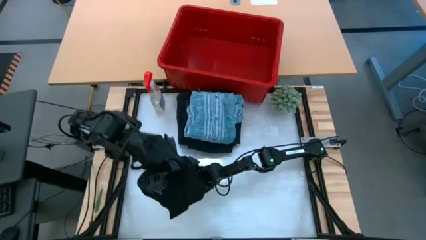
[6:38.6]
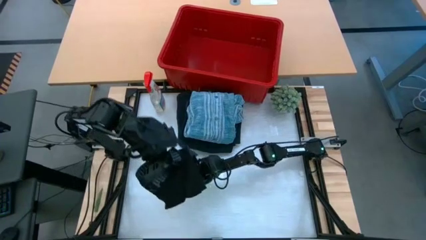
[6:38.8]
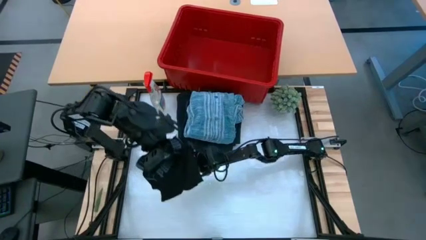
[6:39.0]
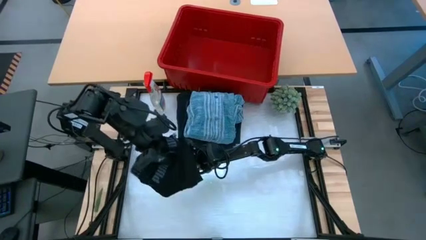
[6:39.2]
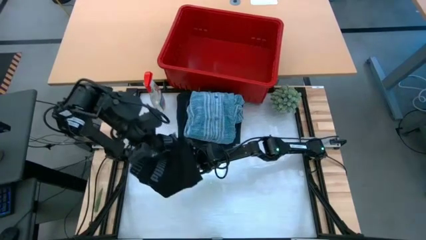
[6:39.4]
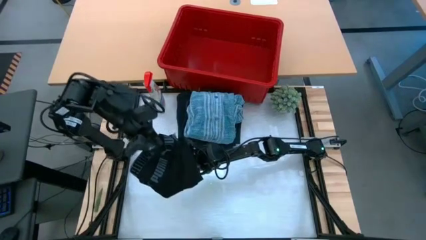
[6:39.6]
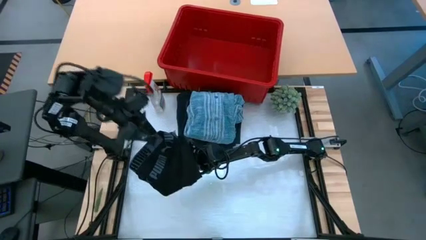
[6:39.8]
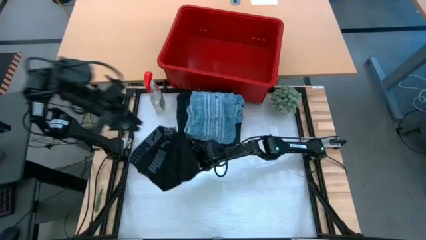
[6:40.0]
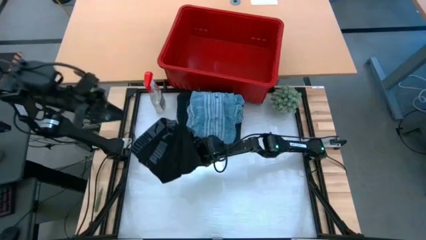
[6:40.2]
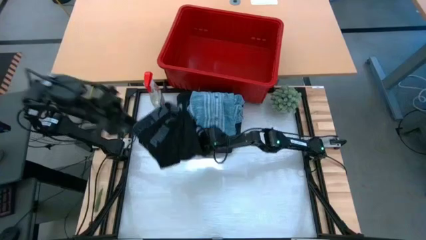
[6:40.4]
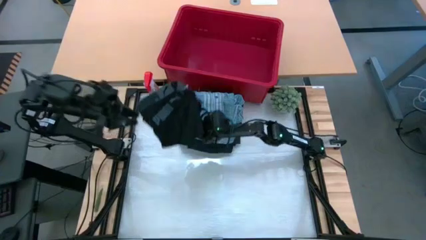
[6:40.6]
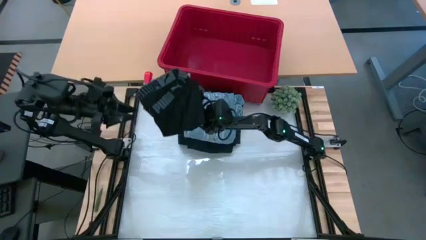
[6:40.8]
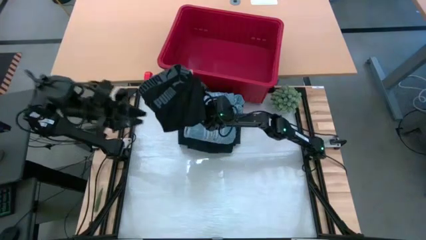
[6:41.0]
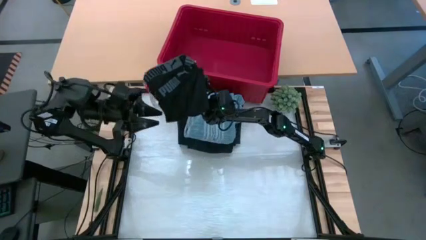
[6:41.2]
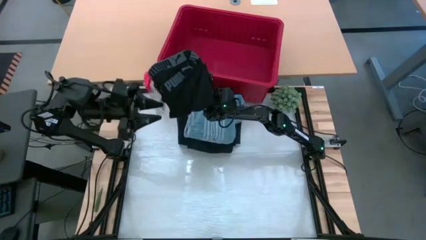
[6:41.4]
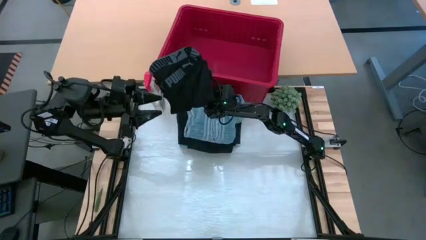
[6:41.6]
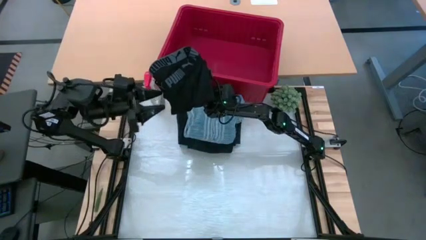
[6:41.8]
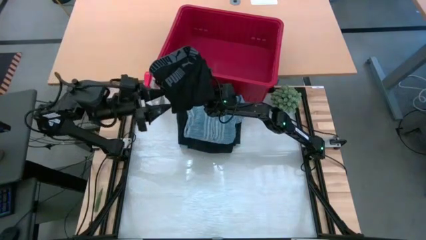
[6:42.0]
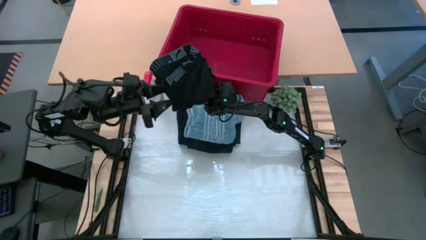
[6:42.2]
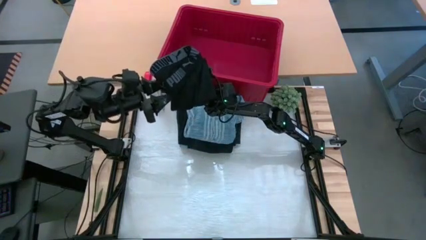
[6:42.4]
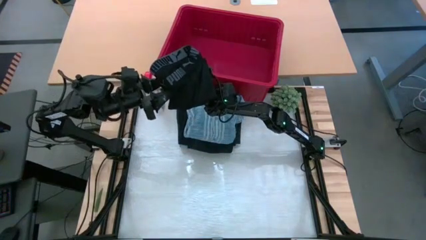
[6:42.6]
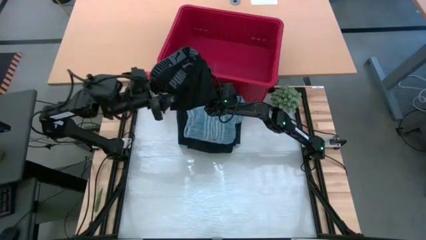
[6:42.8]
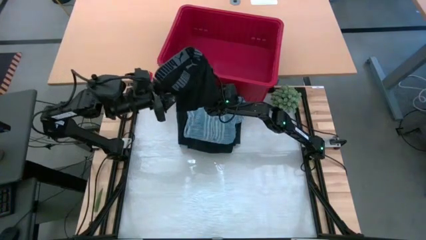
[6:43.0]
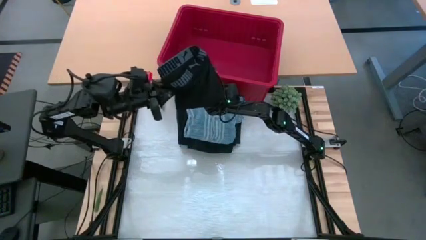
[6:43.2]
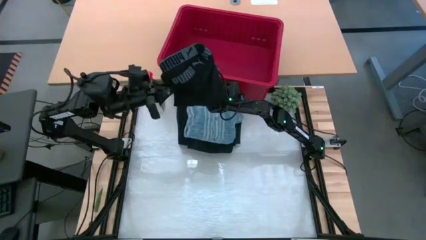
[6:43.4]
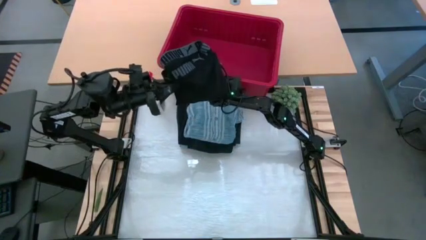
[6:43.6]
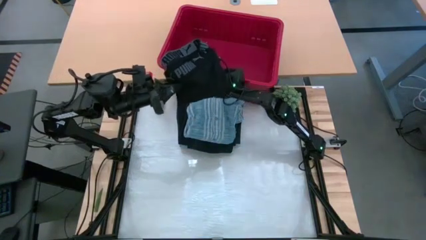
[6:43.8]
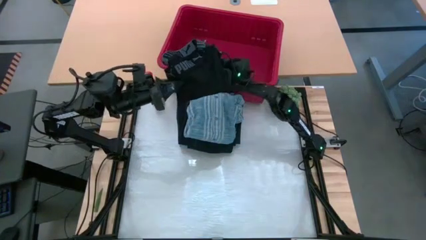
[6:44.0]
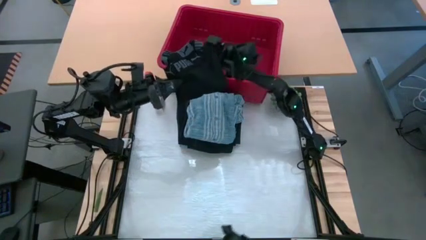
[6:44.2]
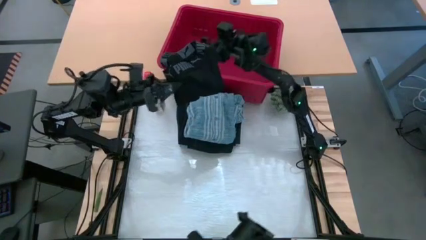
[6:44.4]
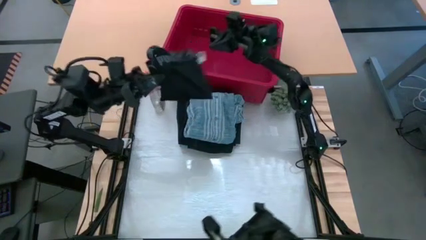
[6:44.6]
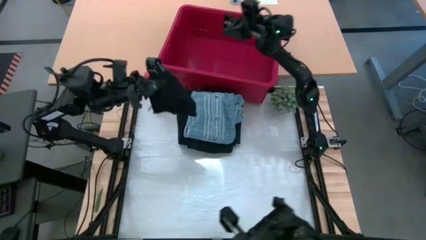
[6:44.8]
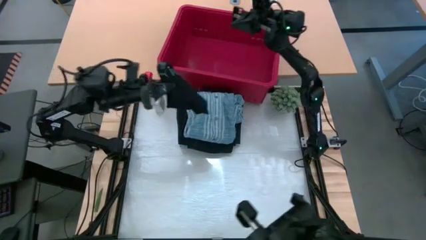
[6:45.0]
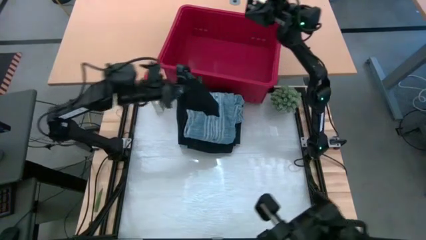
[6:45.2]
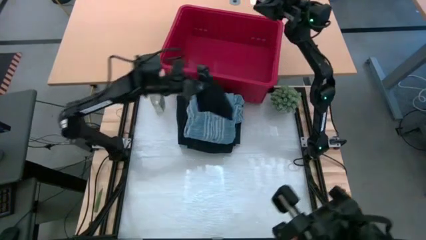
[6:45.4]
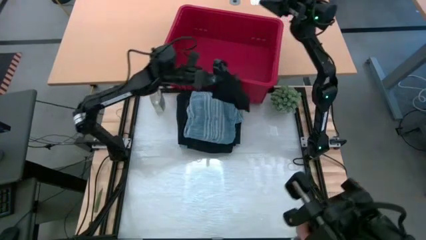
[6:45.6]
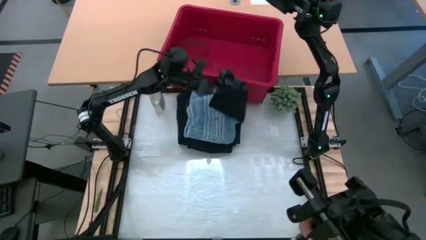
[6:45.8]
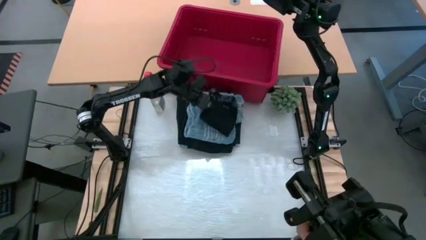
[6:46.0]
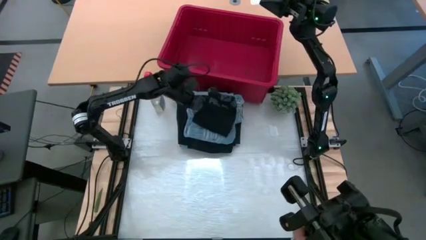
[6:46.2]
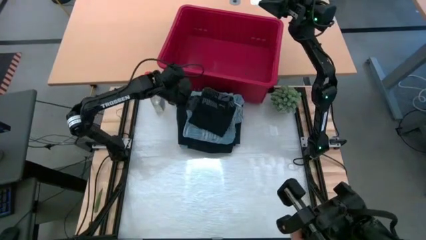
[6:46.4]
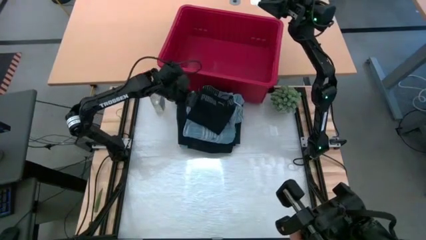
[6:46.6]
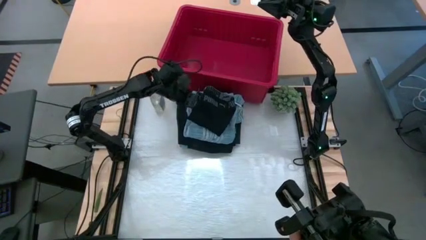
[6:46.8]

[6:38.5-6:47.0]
Task: Fold Laundry from Bin
Stack the black underwear on top of the blue long sleeve

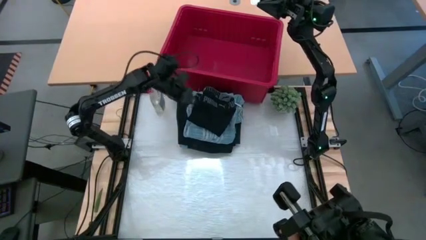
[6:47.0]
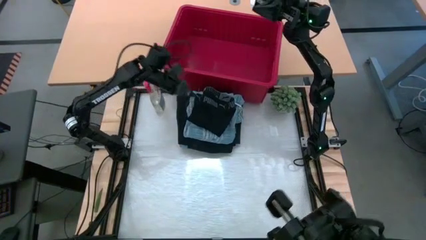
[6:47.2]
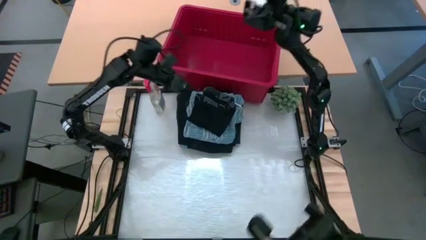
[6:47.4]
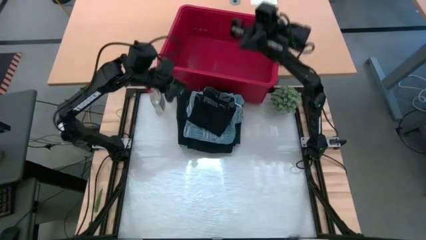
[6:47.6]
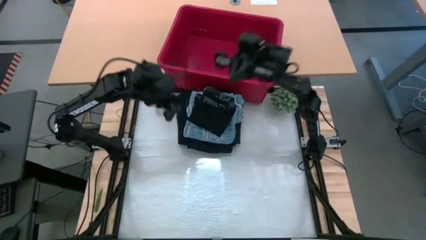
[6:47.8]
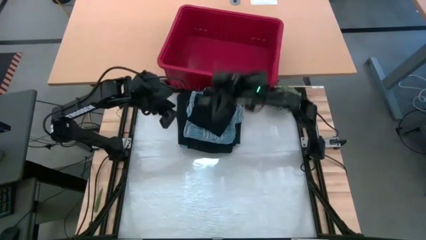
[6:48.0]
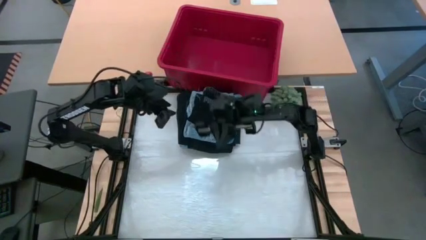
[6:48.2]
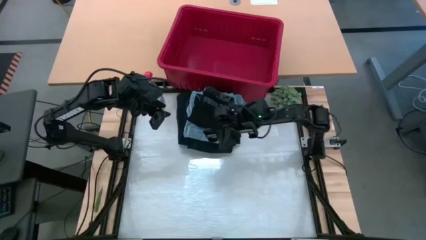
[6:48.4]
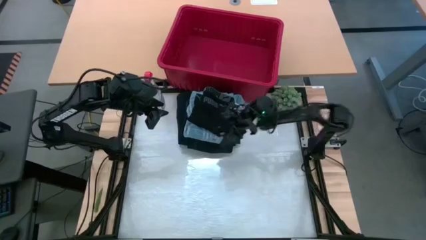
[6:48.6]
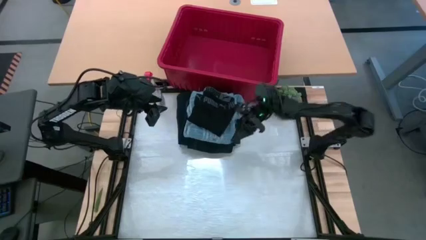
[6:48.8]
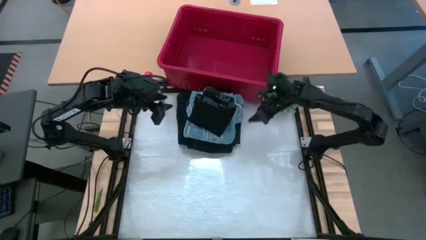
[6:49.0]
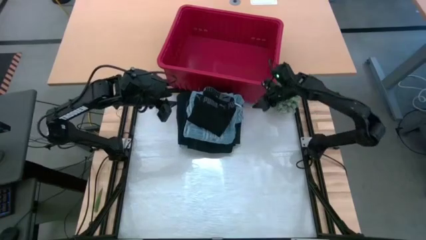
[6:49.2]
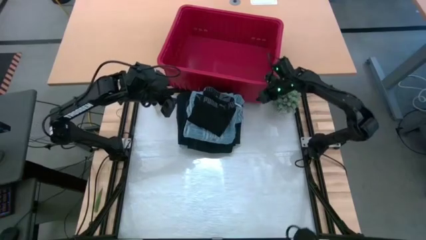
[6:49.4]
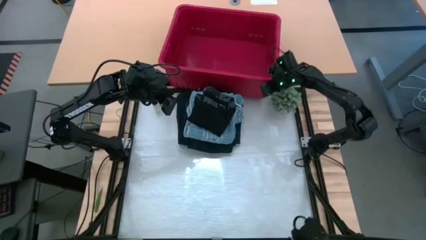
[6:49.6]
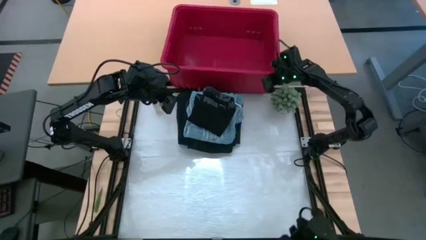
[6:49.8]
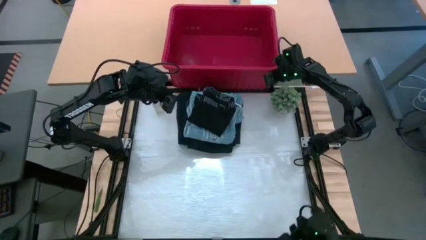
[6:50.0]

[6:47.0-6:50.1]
Adjust the red laundry bin
